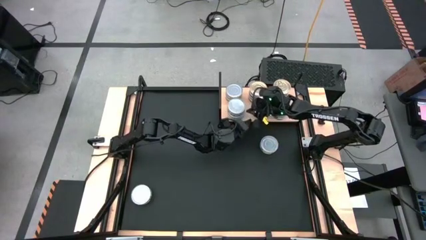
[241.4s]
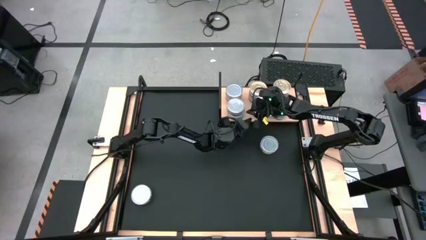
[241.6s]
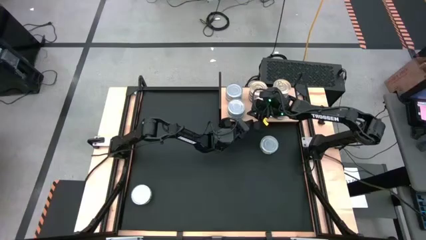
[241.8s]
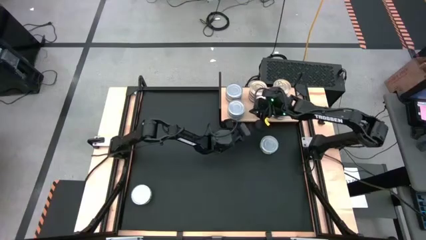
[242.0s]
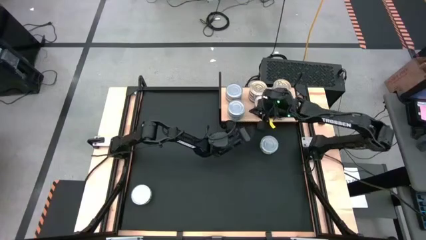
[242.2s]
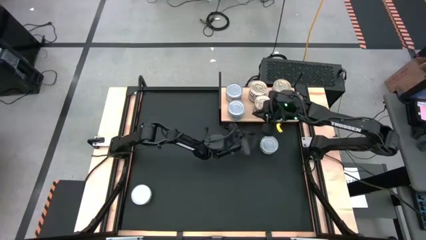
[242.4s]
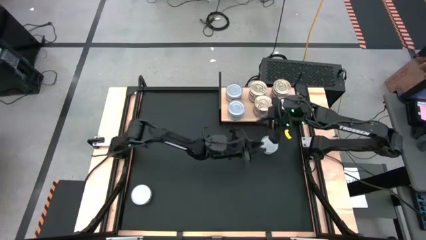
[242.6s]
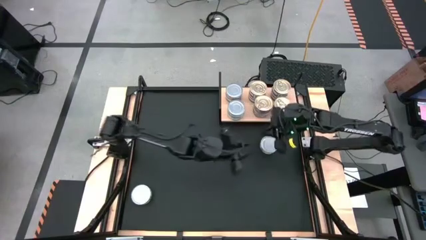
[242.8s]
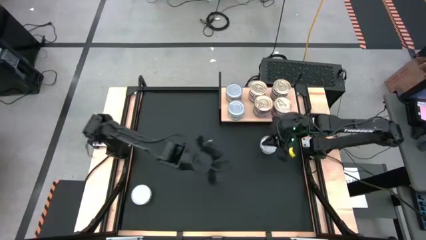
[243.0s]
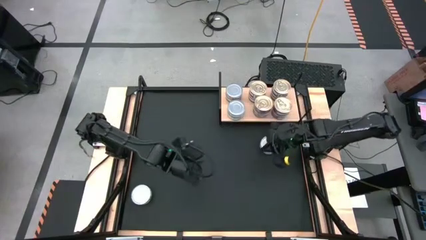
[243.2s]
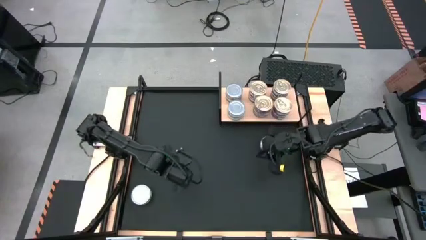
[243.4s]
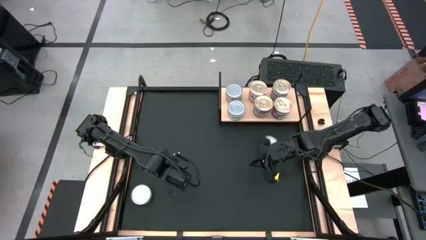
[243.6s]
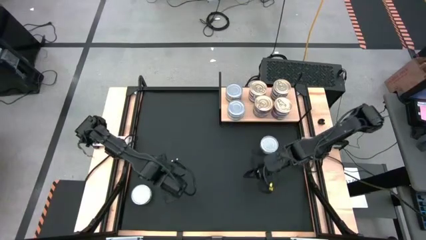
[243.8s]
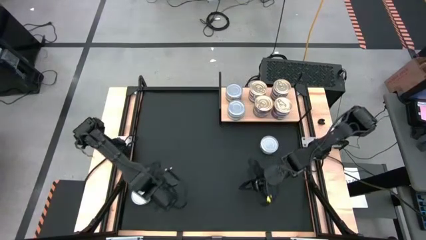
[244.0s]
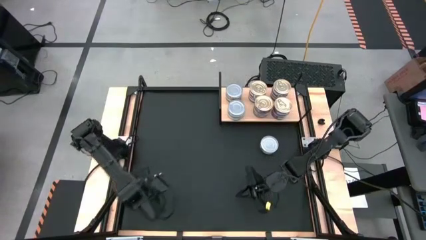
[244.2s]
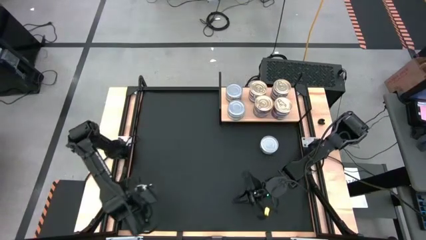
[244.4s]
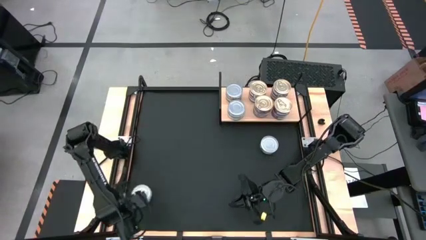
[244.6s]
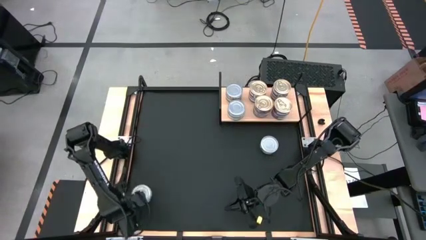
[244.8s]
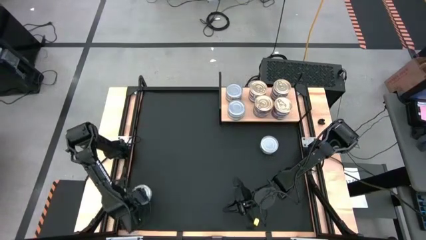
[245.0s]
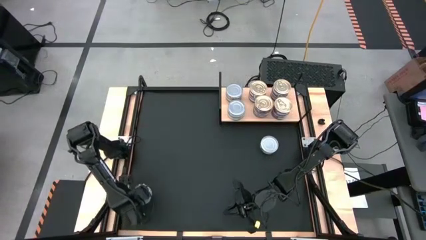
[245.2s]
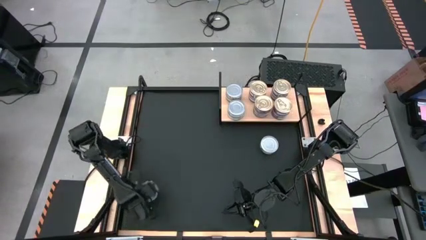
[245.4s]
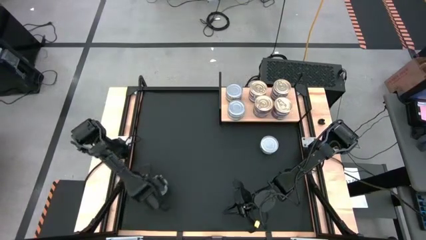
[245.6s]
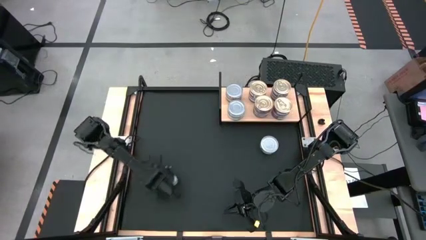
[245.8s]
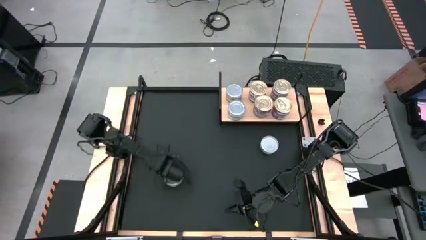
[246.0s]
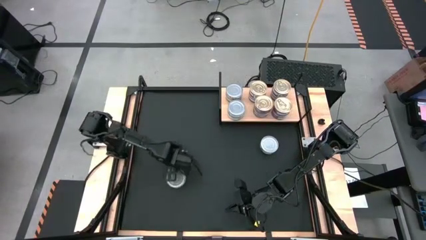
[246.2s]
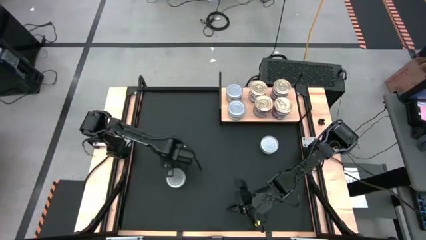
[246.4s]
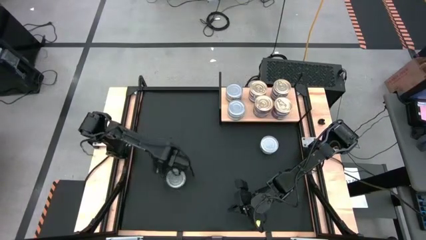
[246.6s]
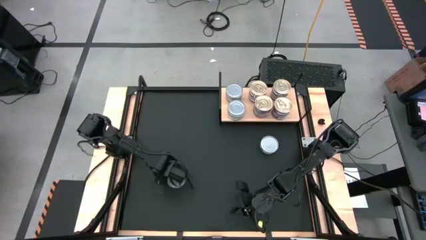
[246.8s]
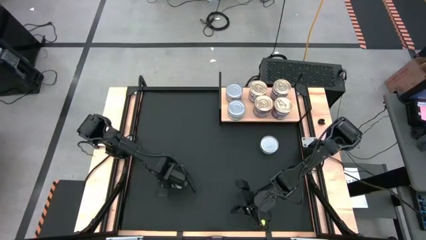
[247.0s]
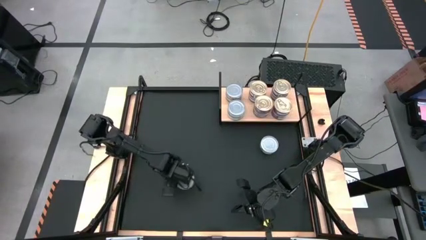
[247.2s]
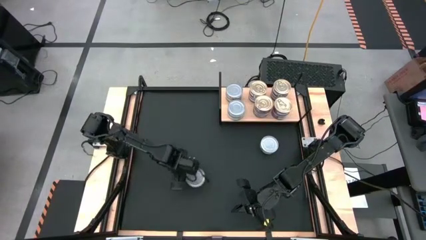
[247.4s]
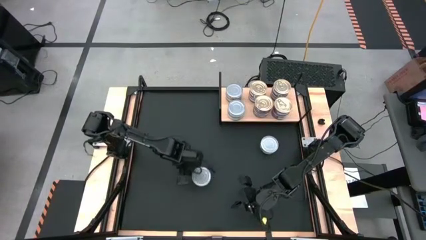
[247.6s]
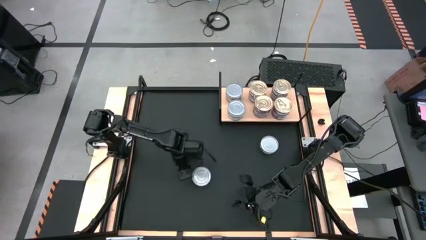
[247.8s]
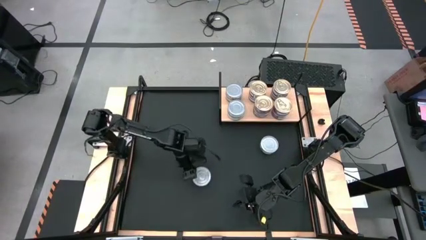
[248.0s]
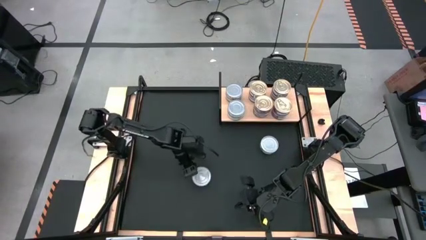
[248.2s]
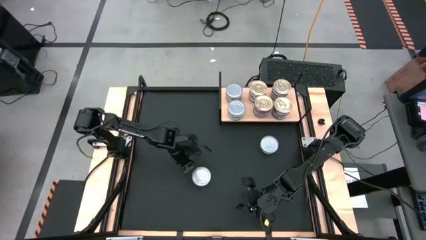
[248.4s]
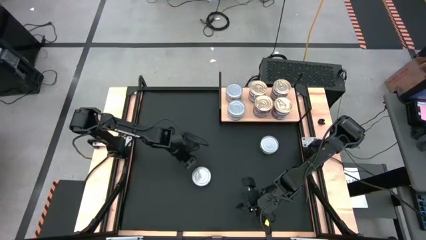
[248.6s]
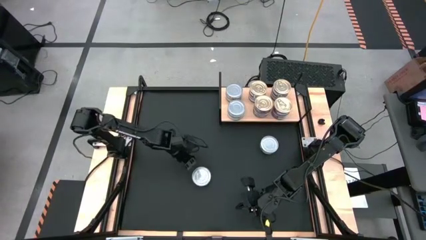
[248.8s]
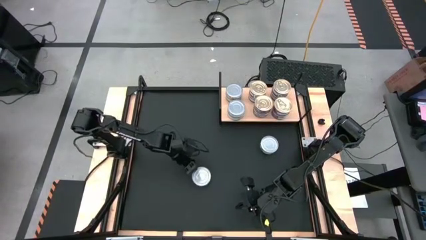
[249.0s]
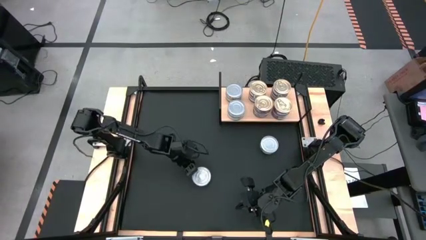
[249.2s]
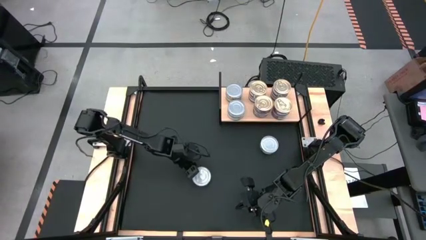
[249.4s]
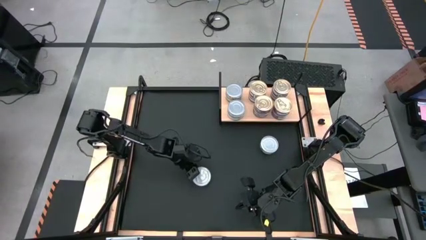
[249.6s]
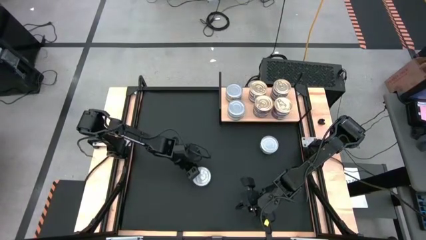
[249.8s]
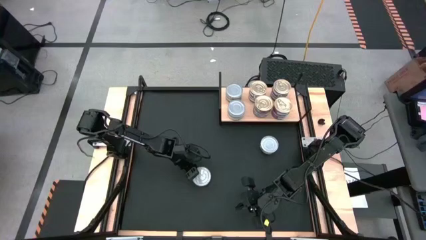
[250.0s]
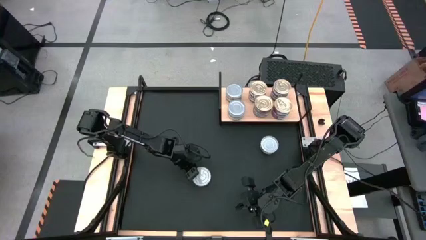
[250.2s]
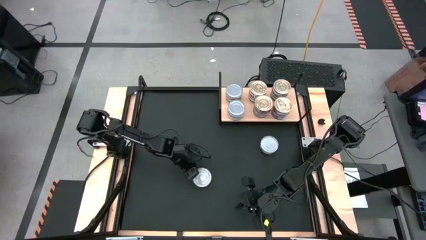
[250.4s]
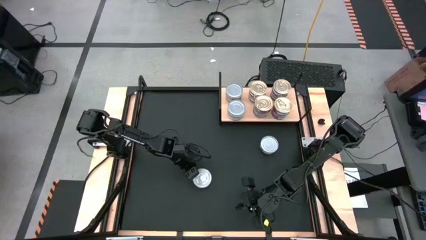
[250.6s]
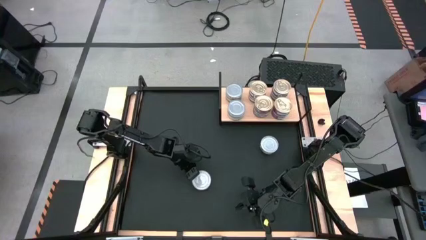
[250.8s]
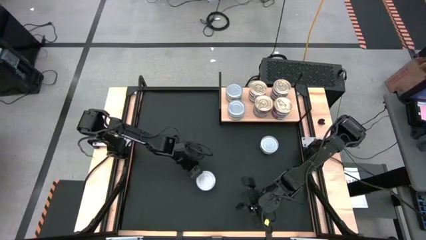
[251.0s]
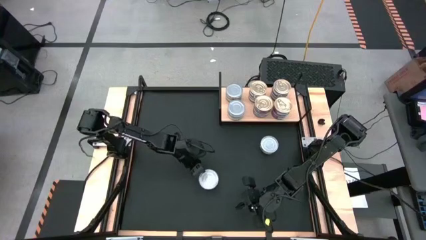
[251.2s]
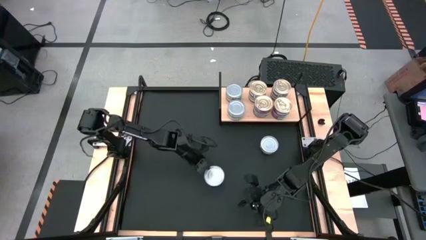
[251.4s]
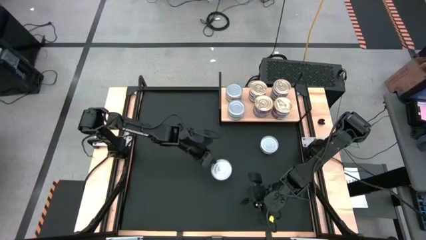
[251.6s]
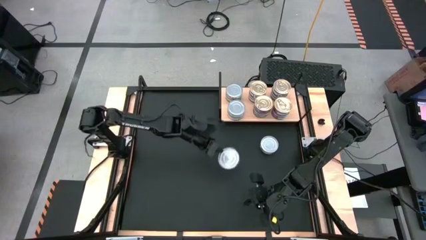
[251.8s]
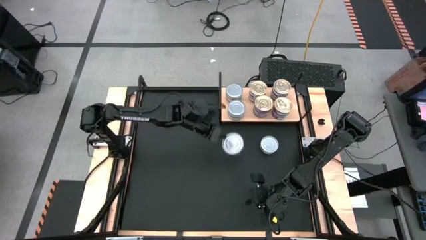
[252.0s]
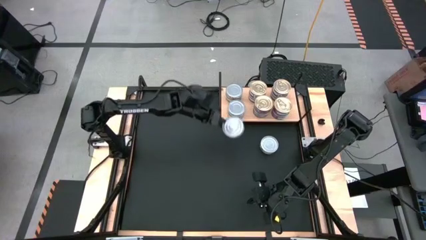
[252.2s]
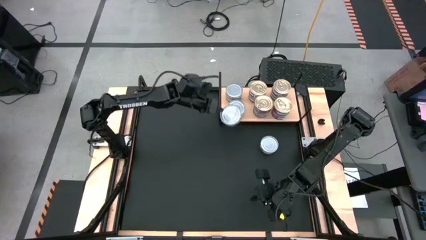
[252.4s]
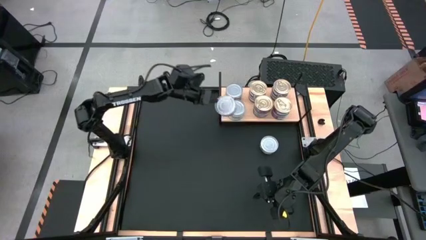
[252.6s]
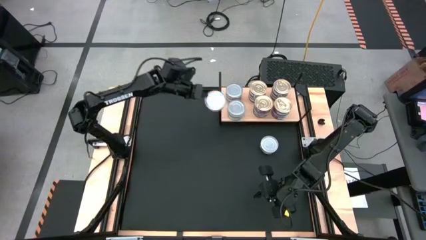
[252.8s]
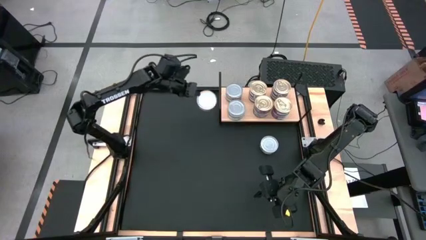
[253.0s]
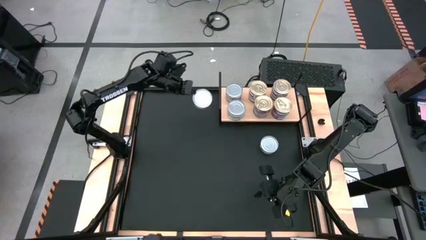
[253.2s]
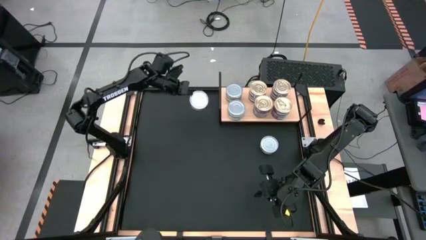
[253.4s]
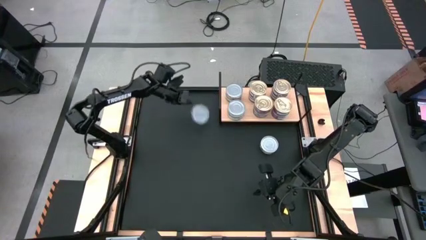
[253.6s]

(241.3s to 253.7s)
Task: Stack canned seafood by type on shelf
Stack the green tuna can on top of the other green tuna can on the shelf

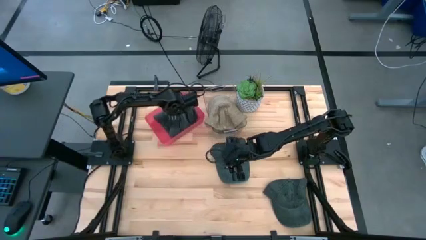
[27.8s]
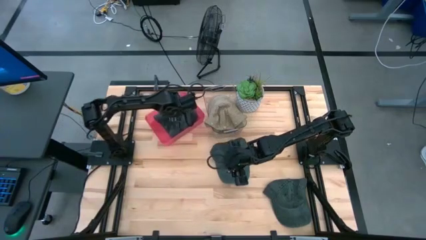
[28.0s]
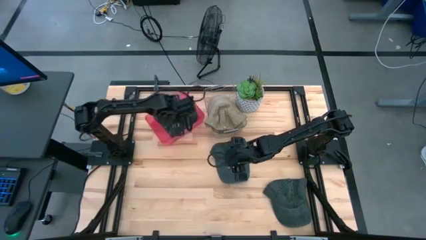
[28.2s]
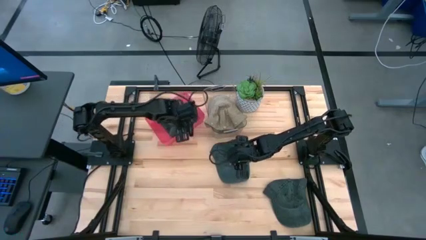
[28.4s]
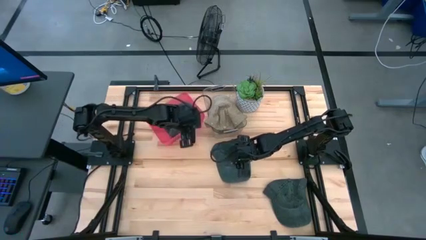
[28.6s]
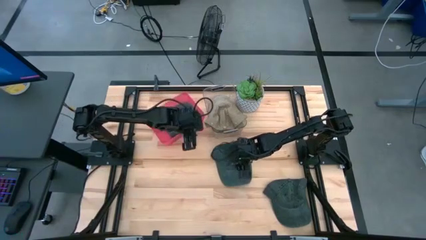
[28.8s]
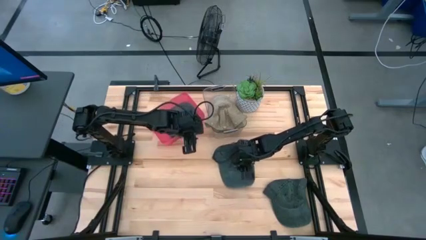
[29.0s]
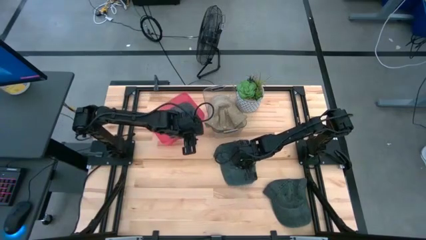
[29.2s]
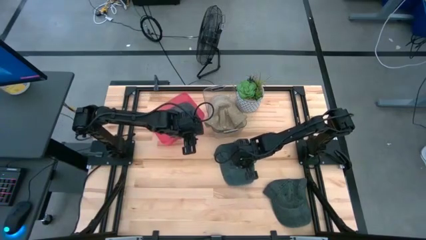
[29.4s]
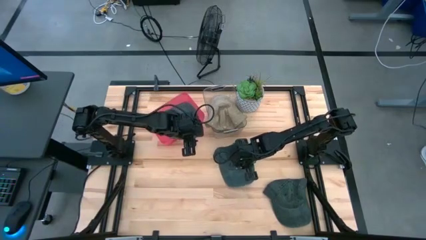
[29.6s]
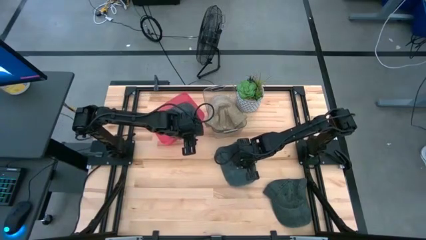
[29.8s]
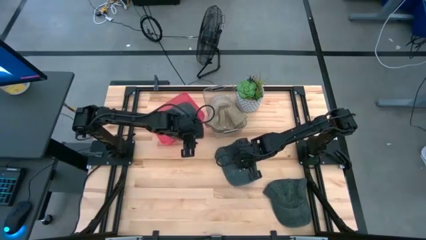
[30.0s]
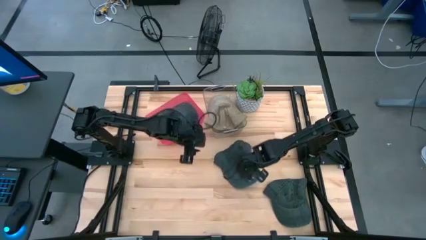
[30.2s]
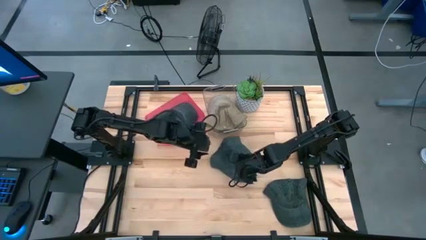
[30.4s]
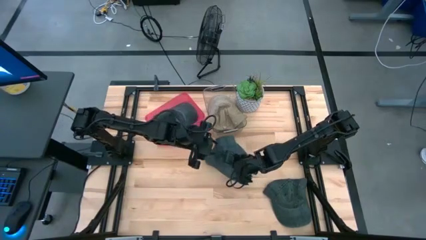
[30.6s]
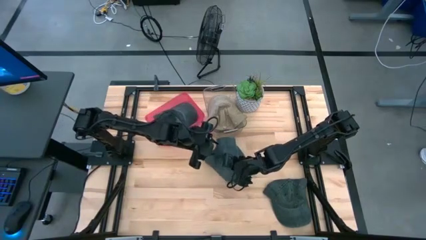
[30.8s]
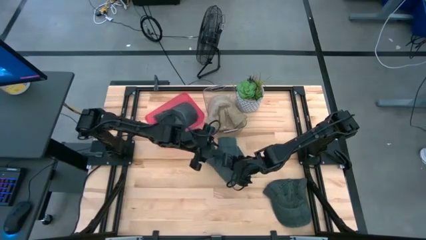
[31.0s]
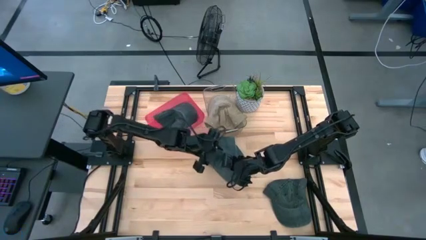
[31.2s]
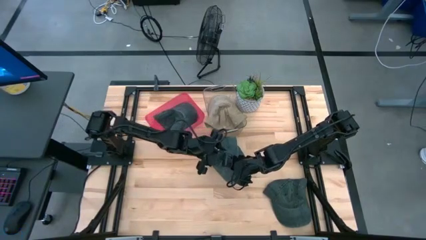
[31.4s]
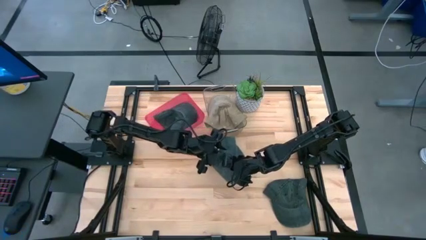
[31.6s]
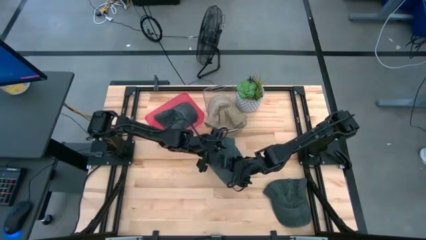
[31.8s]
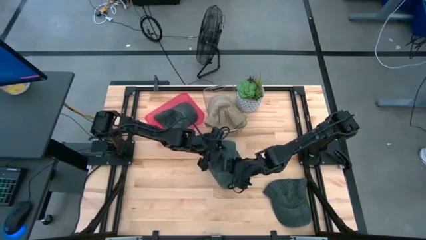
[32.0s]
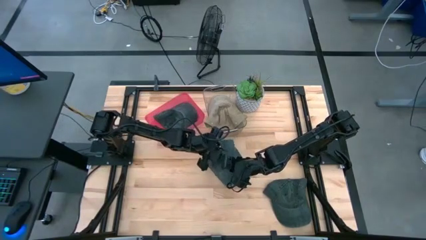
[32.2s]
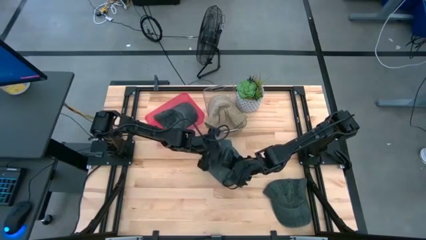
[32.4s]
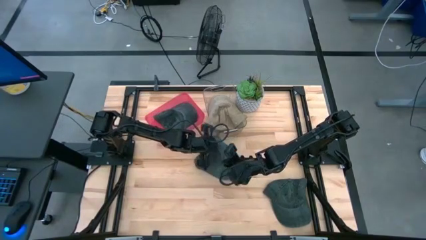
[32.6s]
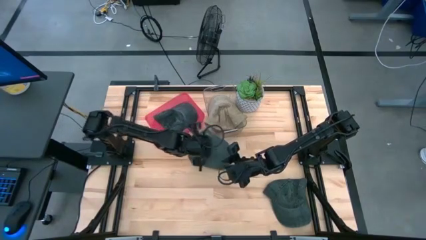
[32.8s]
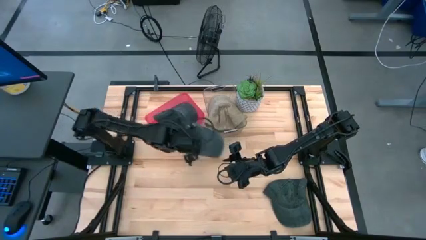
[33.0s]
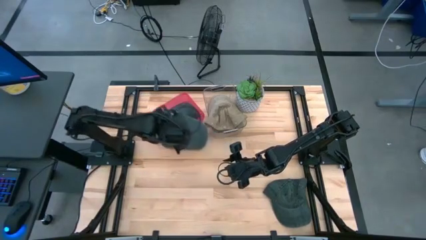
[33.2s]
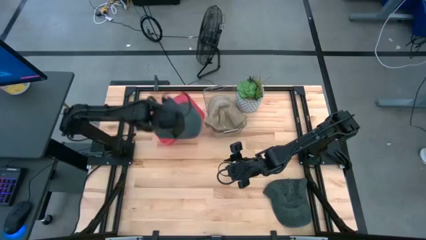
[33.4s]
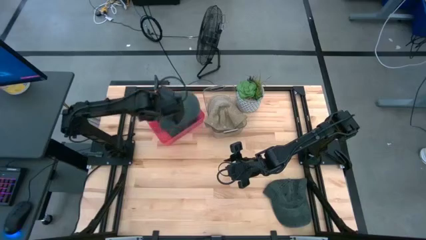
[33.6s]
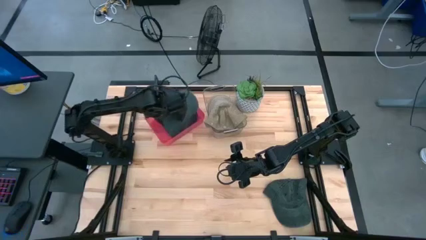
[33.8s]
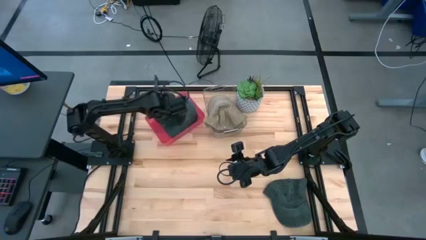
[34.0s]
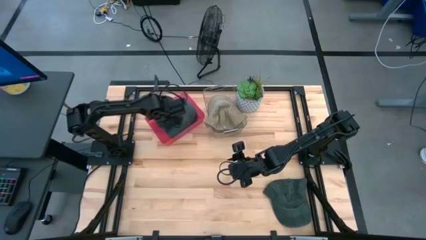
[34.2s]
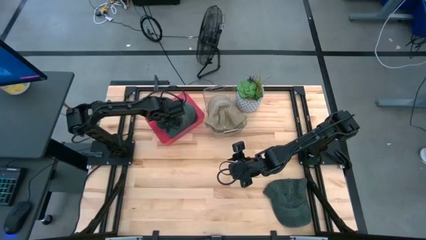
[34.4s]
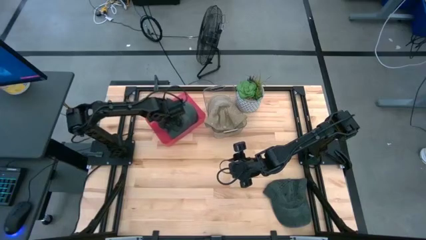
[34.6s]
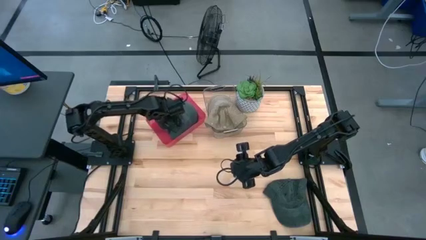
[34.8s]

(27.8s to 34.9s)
Task: Pick & Place hat
Put the top black cap into the pink bin
